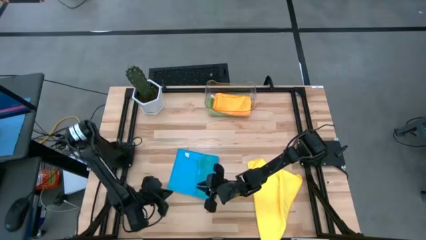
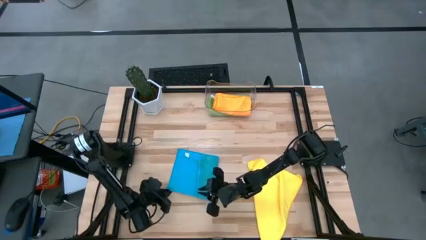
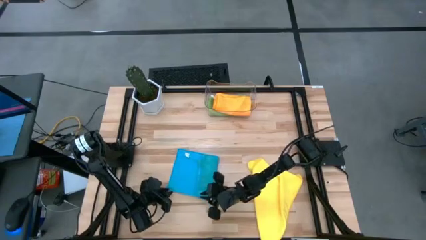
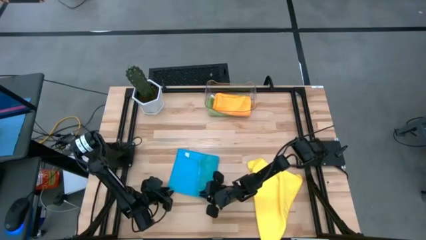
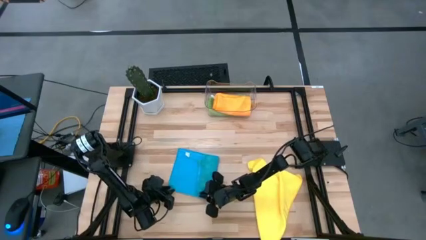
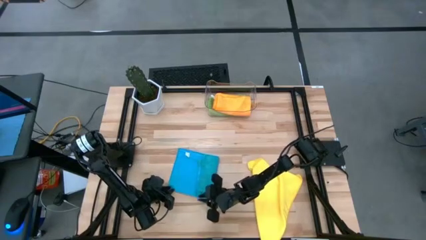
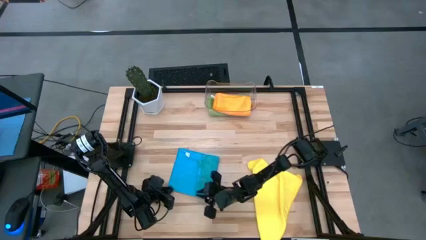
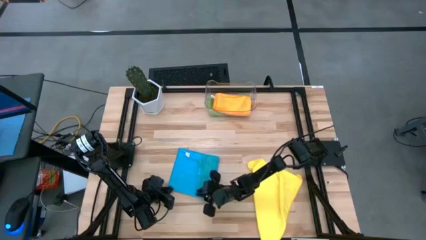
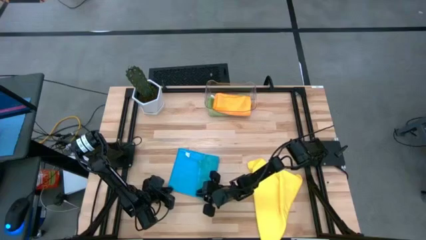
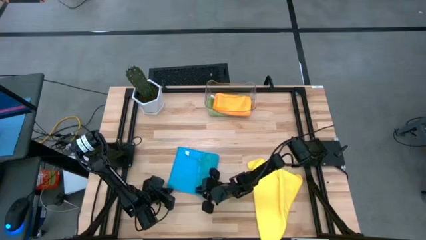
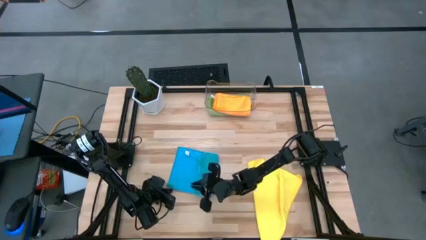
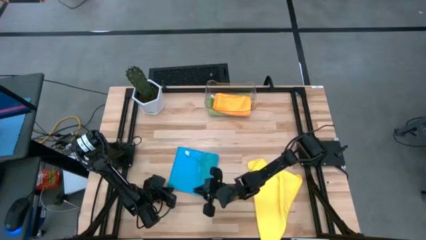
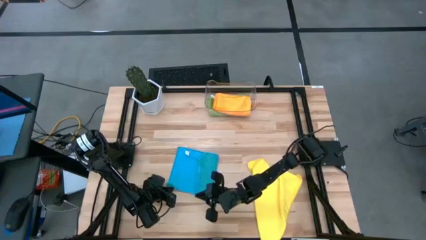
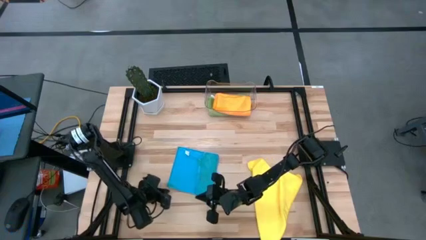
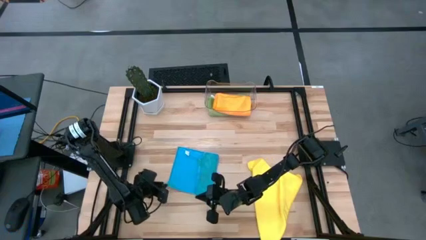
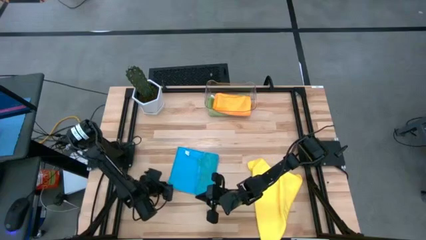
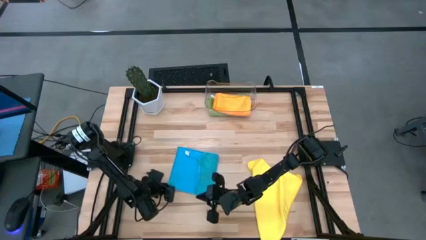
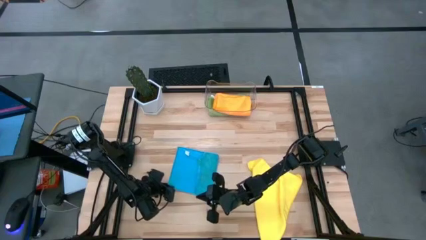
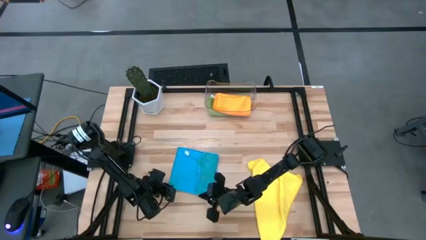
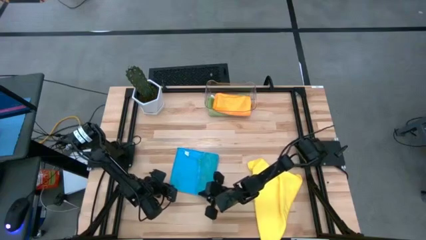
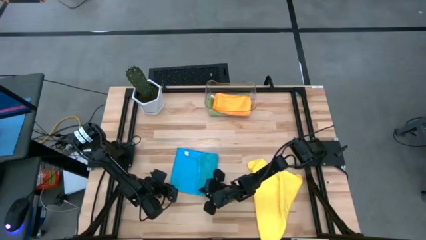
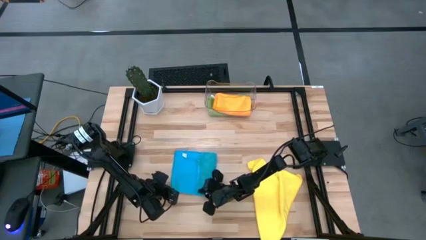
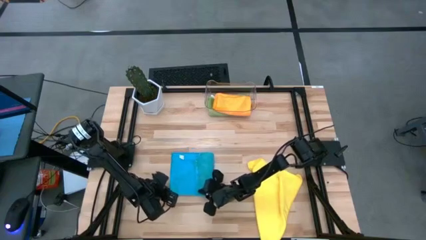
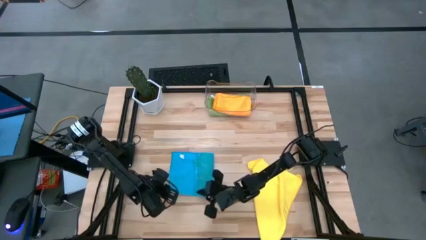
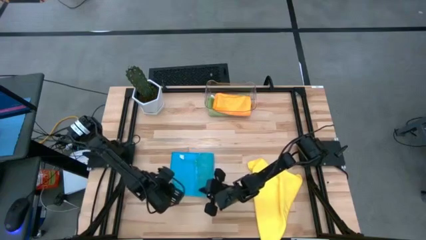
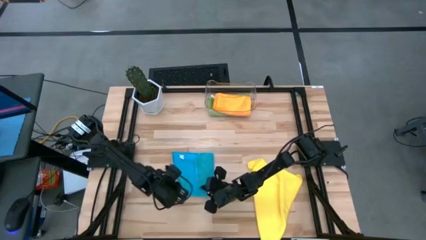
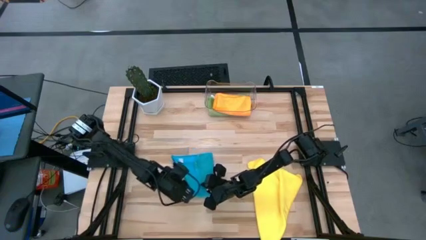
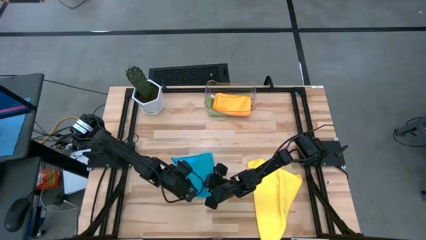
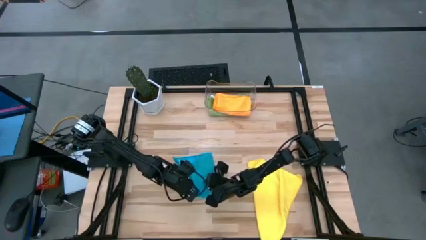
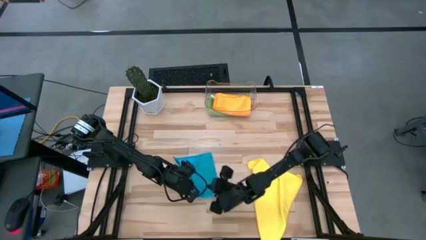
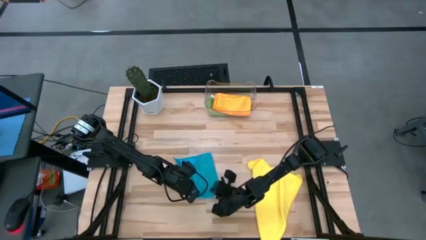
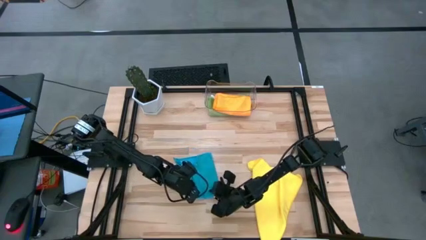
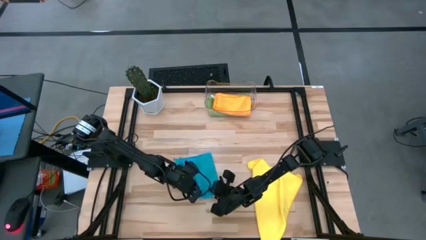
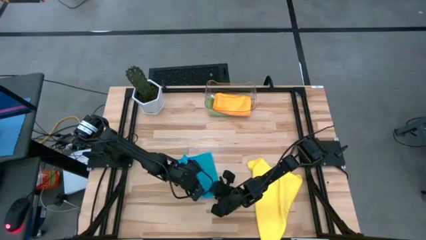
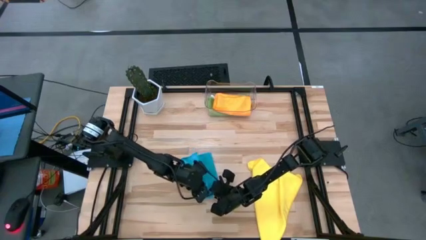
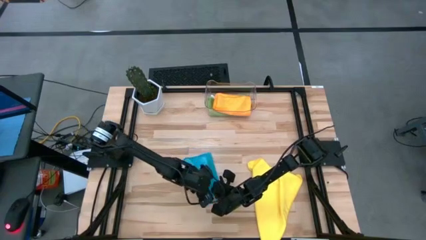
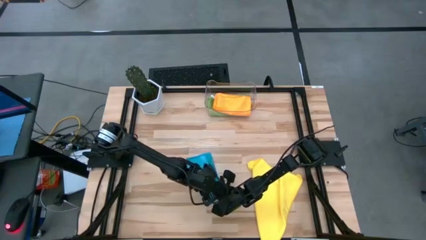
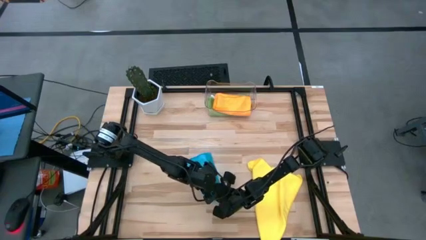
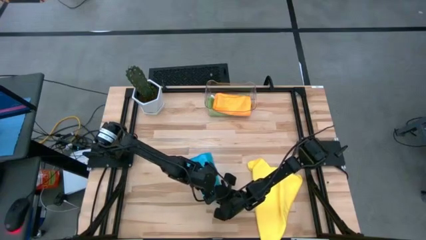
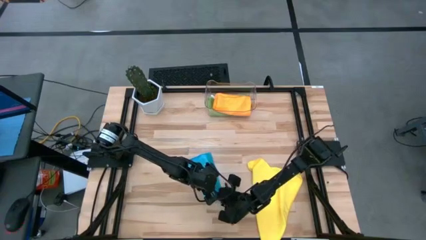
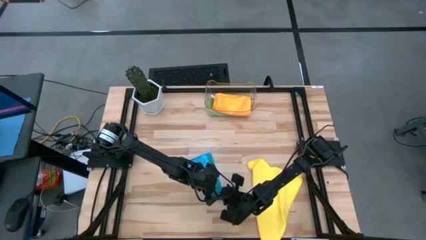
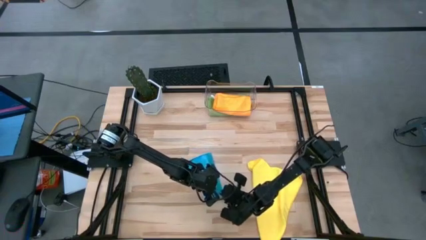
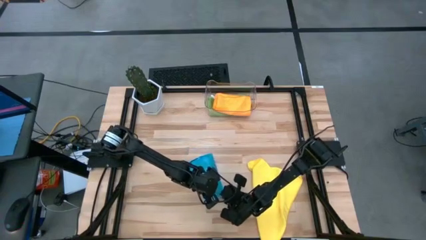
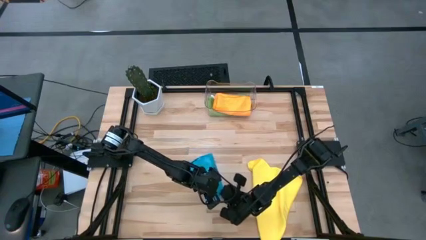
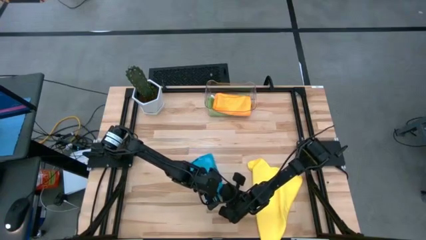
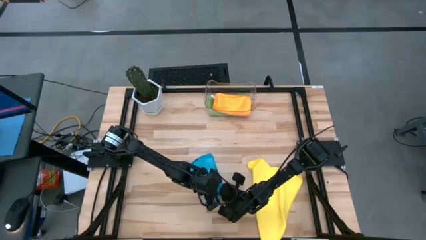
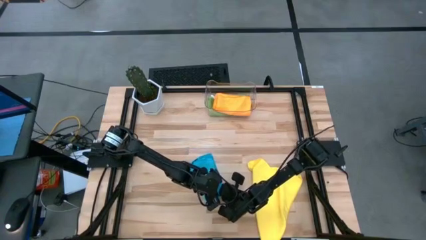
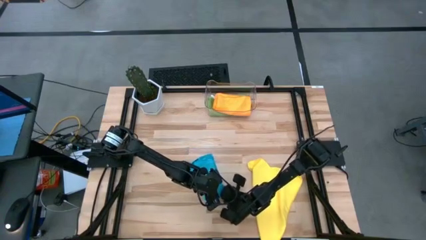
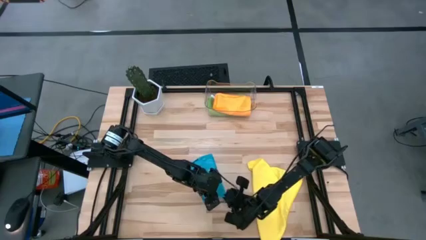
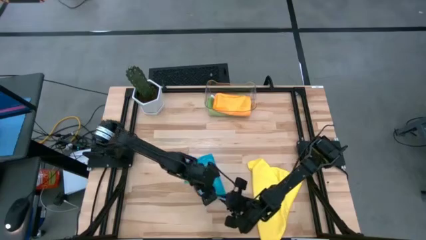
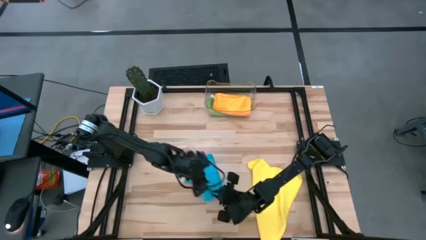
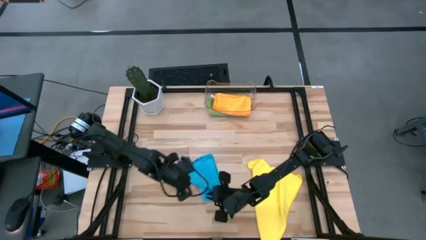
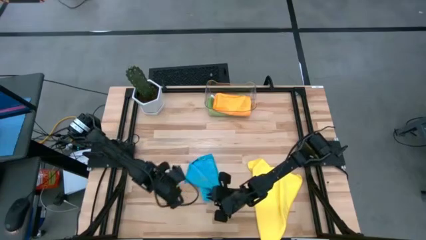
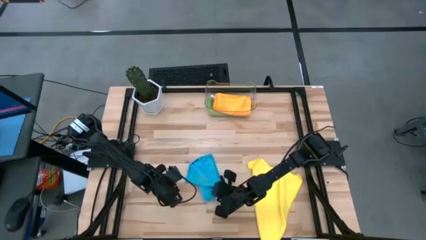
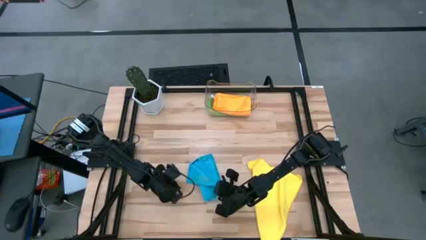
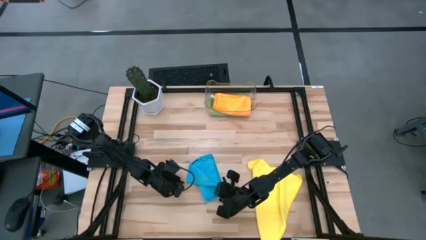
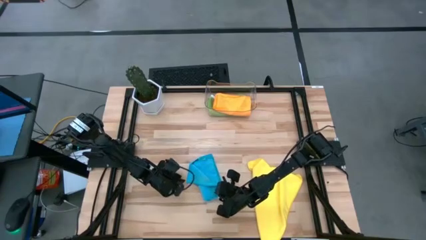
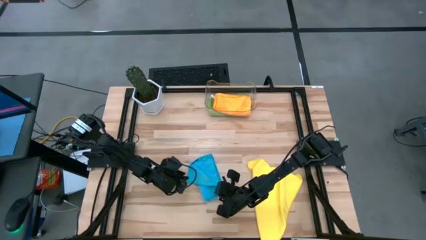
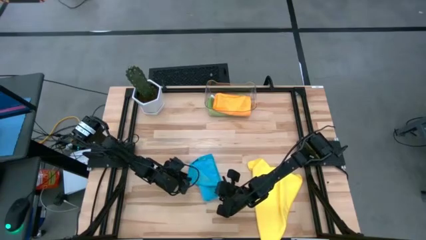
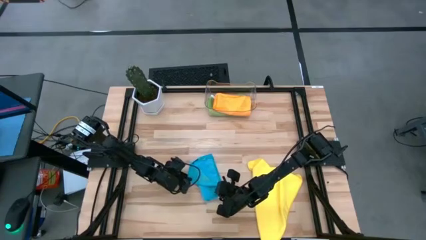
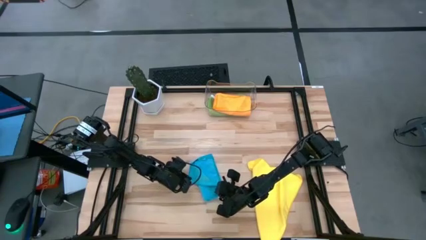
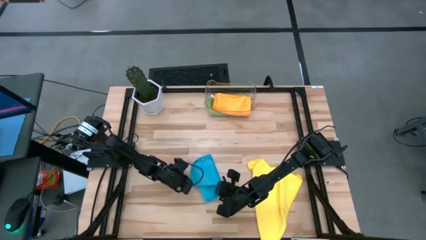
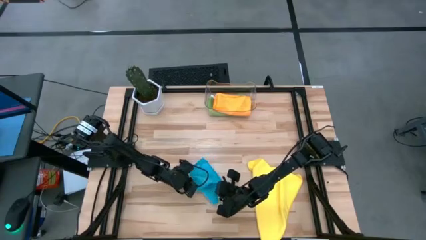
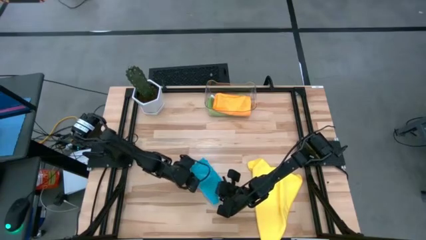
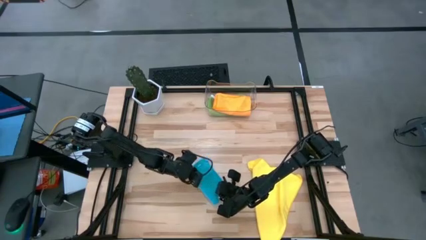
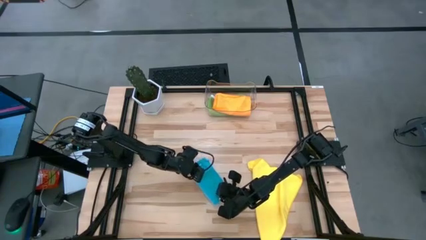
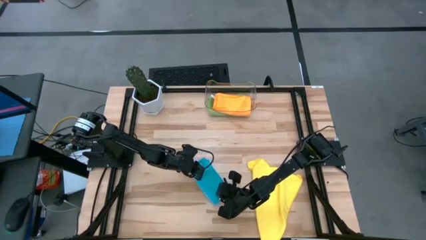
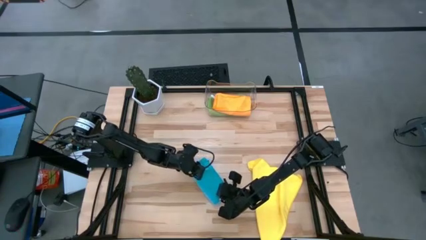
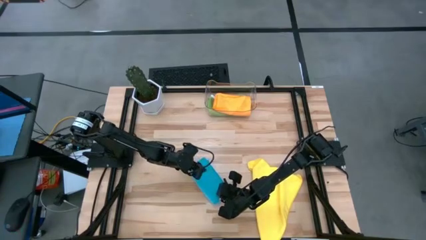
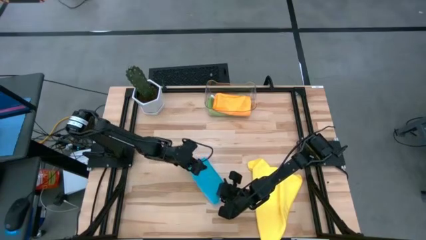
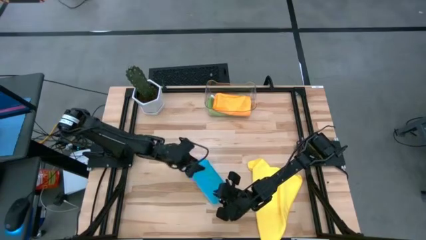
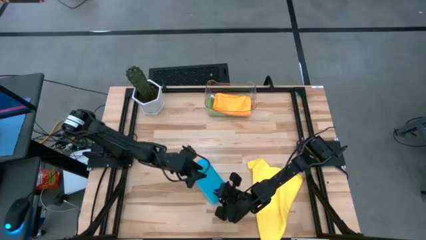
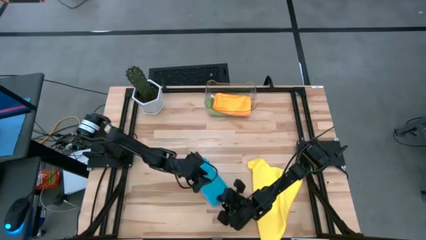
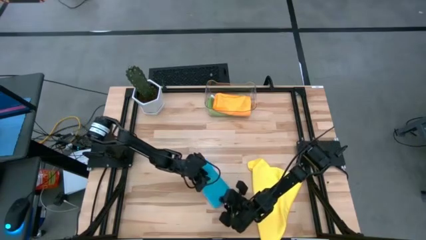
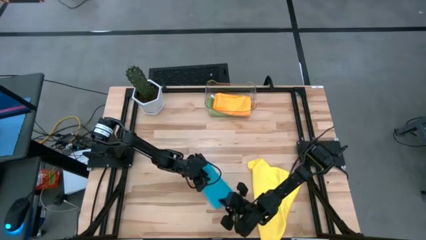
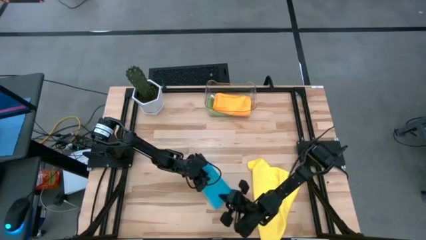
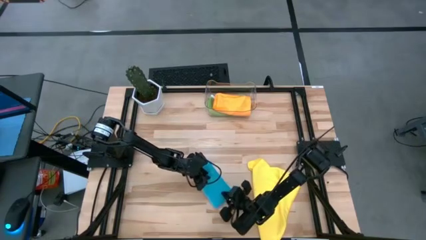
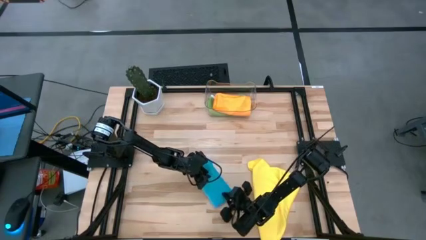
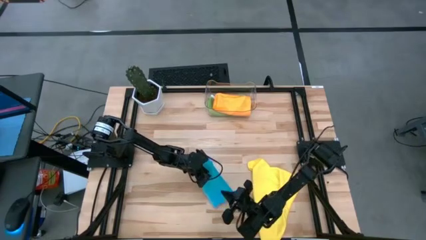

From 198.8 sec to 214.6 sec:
Task: Fold microfiber towels
Fold the blue towel
